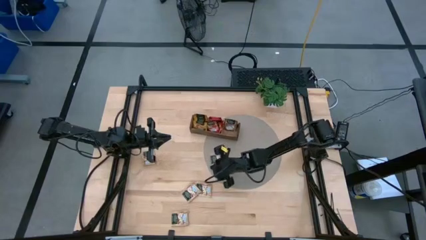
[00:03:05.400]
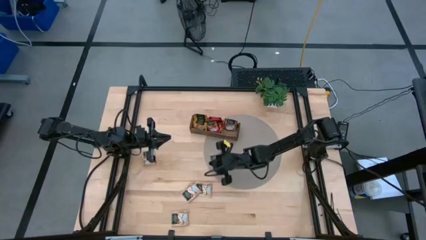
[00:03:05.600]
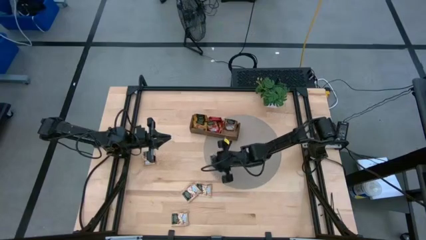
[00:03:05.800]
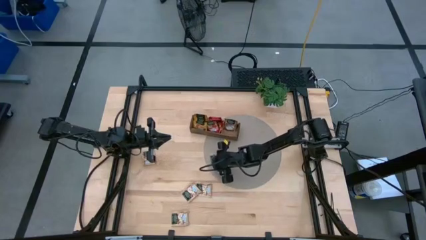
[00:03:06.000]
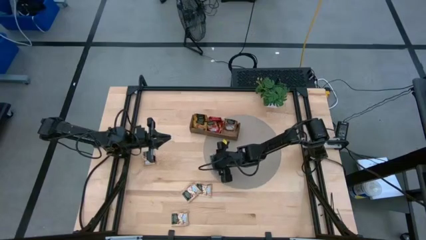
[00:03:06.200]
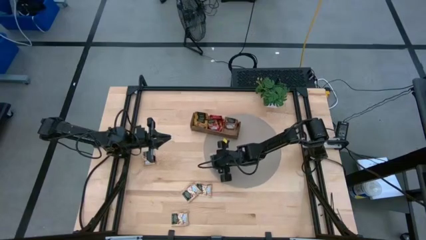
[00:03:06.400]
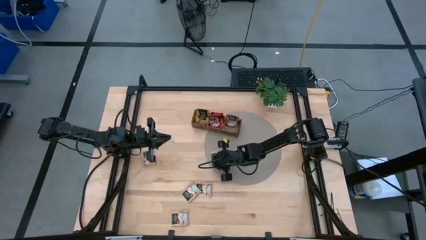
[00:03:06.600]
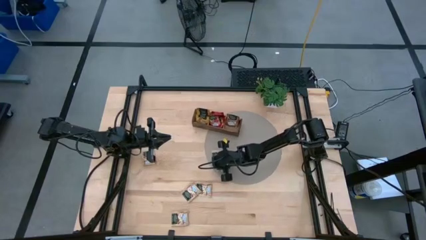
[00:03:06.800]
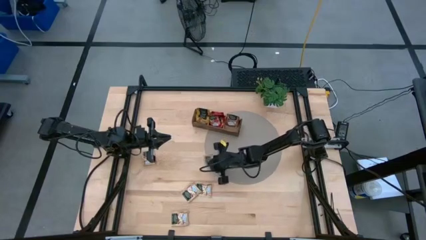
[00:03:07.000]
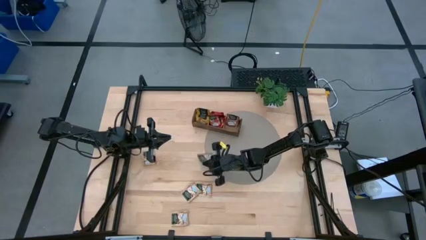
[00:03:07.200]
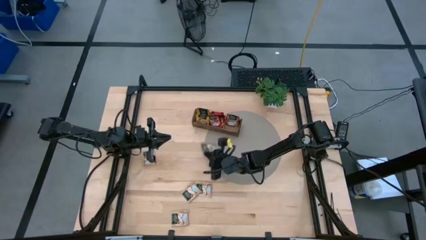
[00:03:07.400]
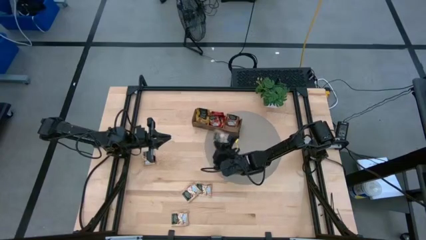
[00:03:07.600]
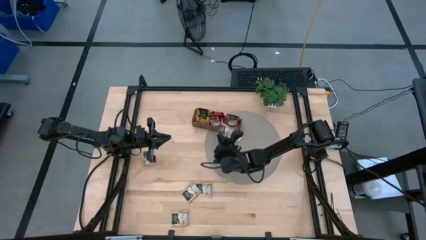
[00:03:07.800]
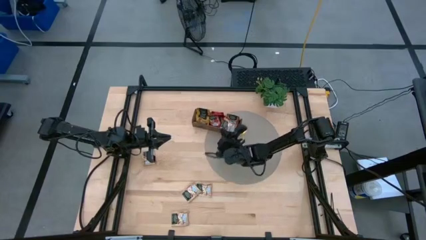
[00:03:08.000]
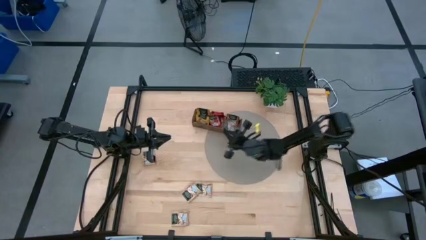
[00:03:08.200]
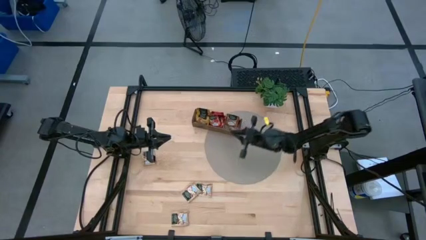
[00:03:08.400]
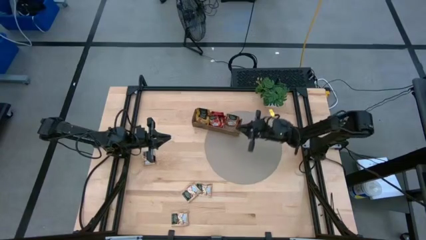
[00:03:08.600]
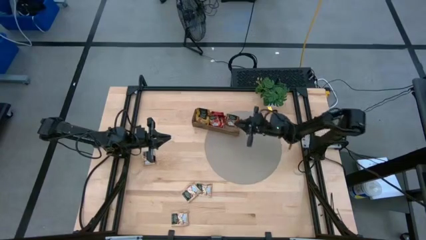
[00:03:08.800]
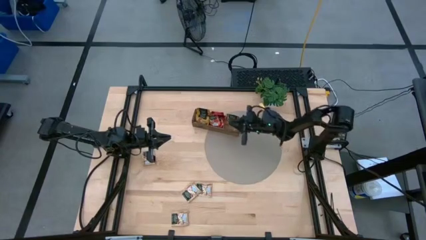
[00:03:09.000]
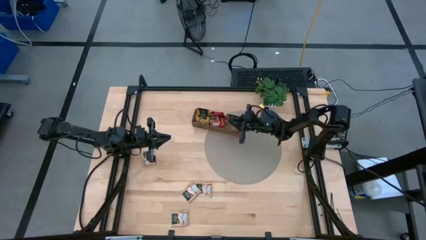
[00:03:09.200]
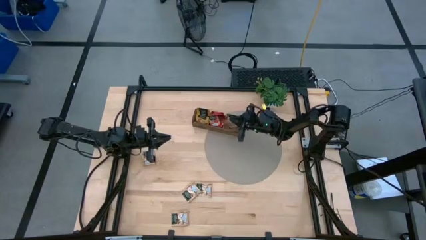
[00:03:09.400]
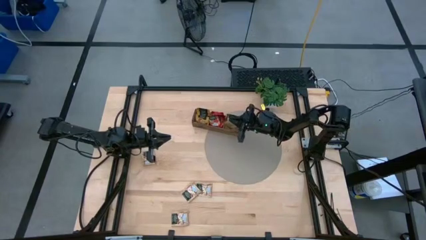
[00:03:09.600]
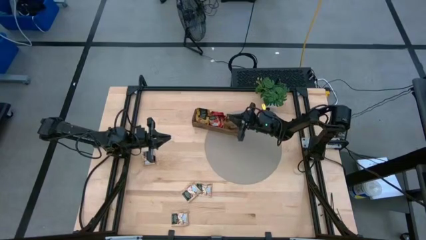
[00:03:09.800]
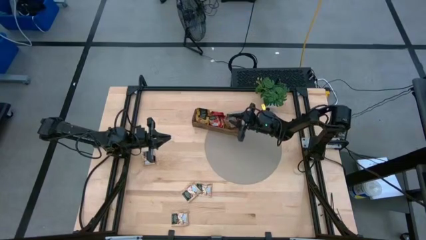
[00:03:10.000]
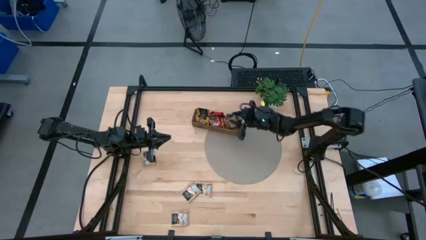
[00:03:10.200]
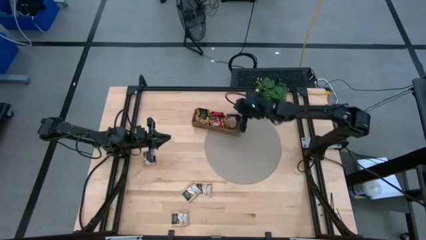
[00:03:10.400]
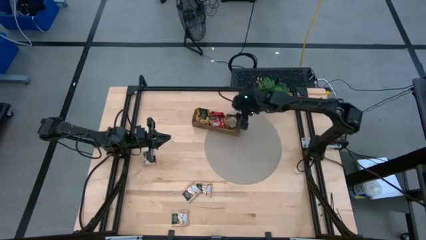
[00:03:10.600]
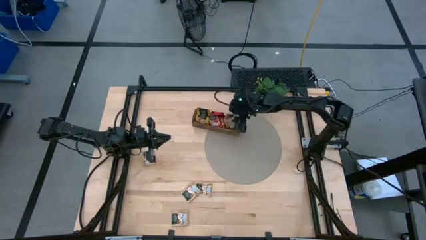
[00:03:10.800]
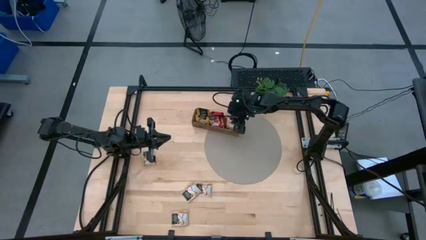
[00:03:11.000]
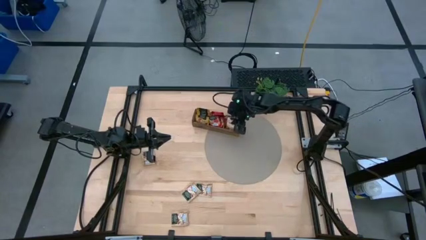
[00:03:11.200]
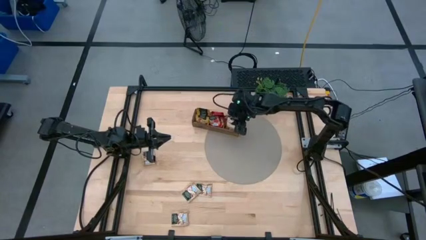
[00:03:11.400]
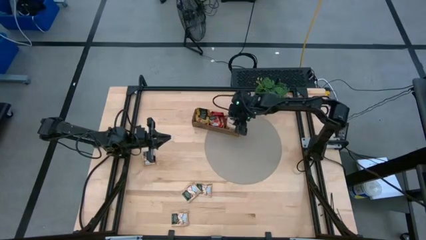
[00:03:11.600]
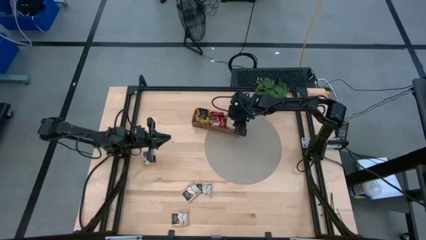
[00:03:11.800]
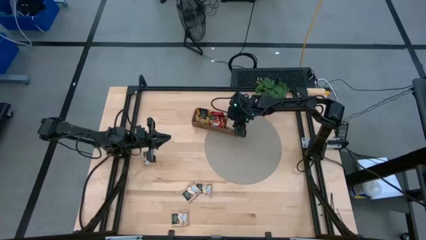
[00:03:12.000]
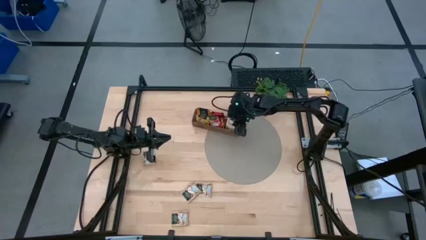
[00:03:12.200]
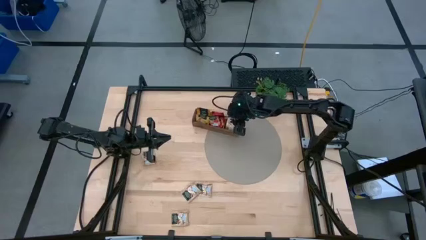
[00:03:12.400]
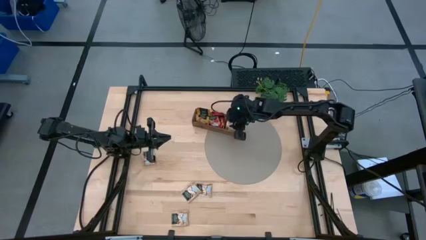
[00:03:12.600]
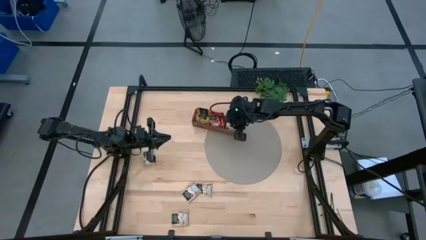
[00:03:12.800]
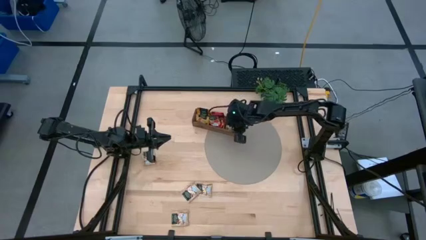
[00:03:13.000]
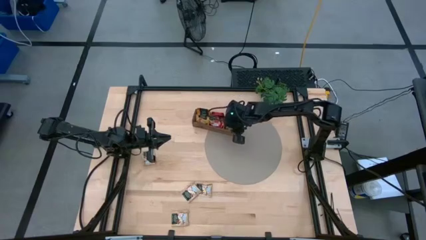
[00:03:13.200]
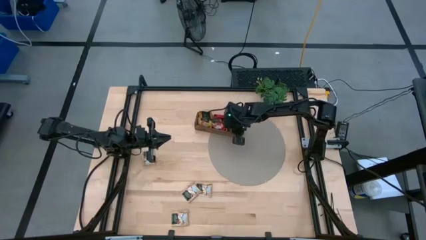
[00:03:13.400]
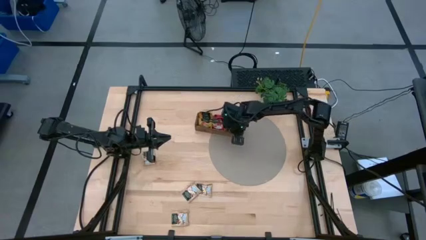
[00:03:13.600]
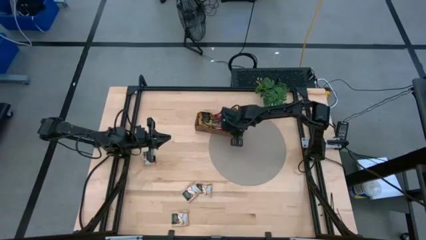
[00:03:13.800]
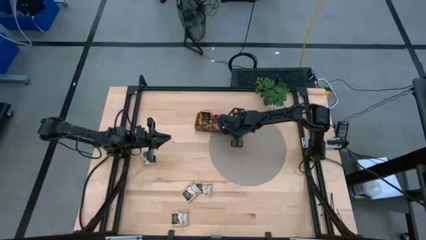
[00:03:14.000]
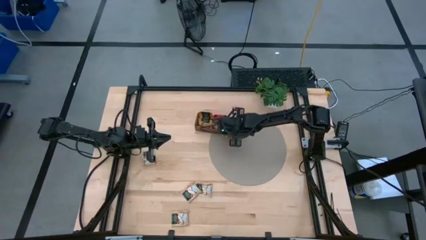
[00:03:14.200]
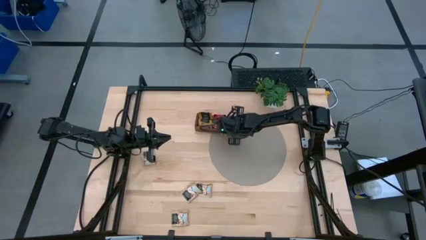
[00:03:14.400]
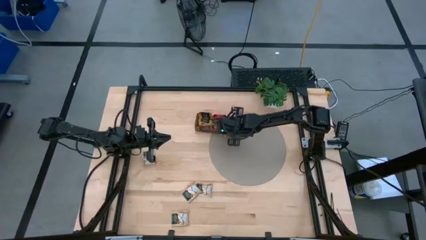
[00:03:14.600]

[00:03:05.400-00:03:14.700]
Task: Pick & Place Tea
Put the brown tea bag into the right section of the wooden organizer

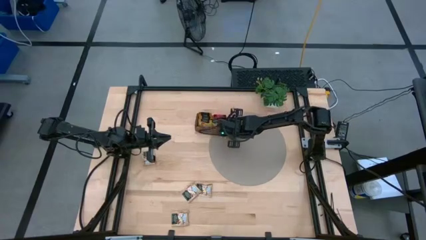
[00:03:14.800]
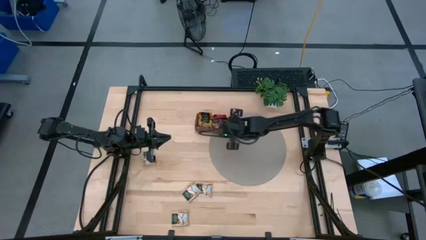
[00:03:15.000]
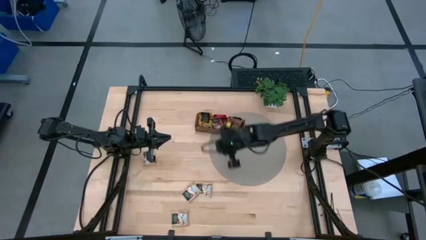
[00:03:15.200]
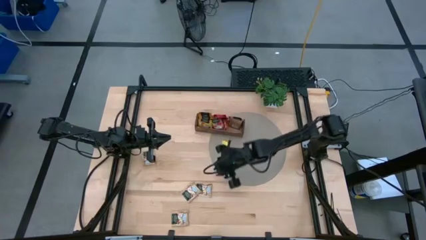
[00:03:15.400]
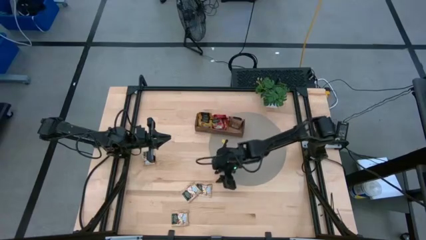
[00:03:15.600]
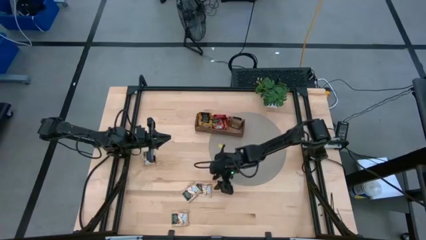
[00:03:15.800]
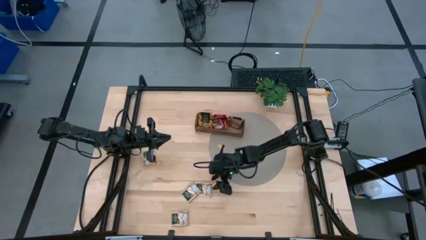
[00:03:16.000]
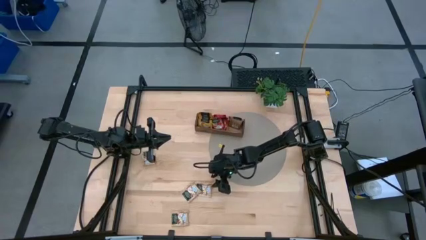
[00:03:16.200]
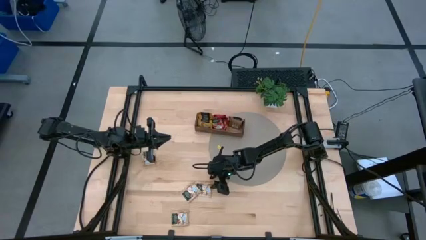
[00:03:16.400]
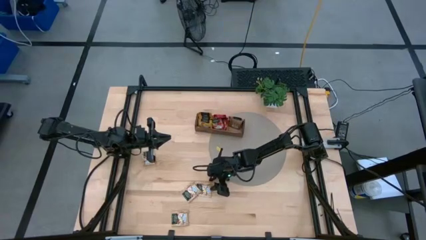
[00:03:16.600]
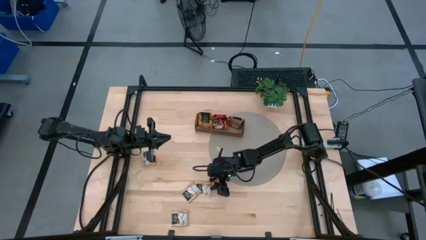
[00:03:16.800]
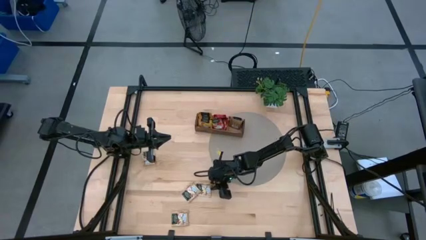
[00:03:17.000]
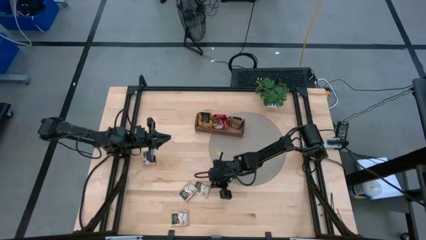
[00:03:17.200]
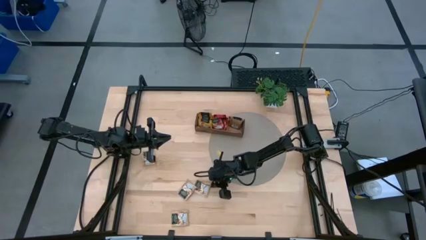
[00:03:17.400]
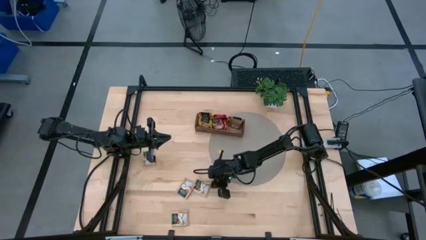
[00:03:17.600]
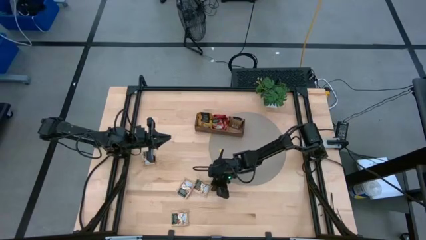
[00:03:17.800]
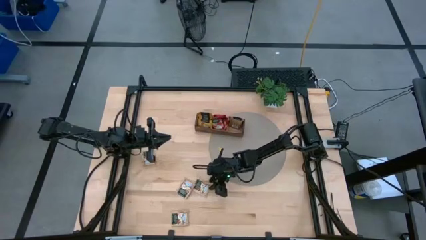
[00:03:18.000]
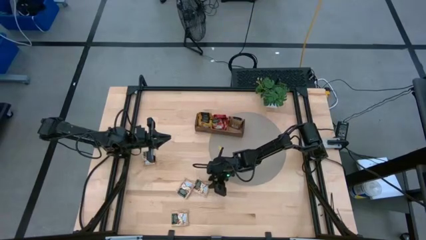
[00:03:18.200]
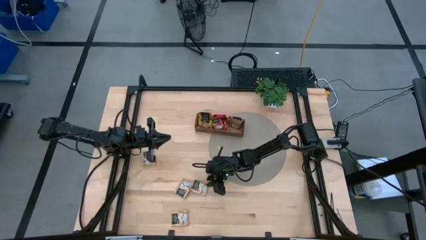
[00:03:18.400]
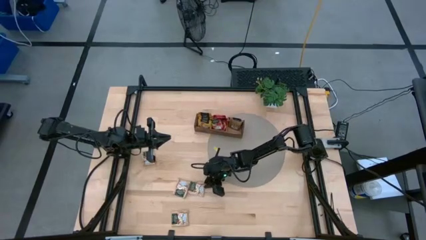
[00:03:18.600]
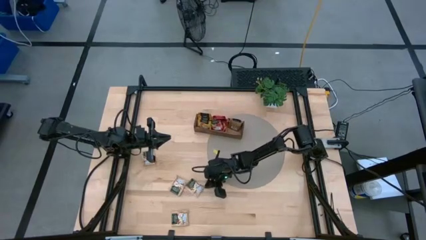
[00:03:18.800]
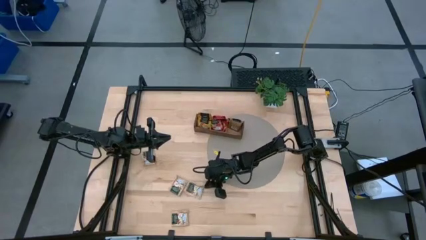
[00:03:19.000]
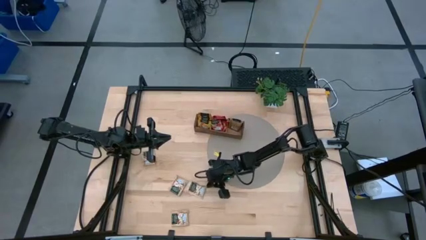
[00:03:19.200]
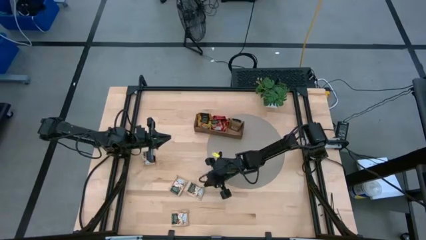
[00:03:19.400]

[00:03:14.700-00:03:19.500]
Put the brown tea bag into the right section of the wooden organizer
